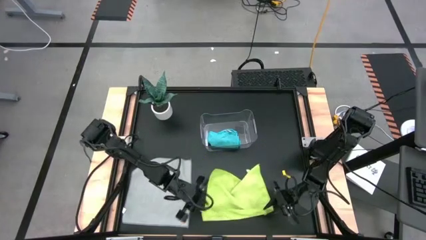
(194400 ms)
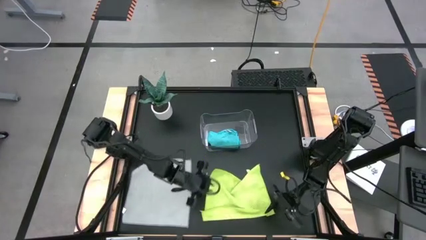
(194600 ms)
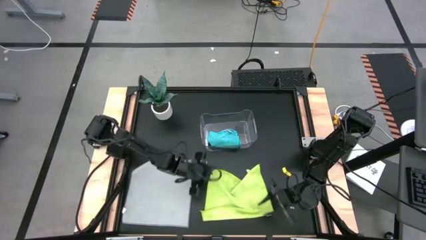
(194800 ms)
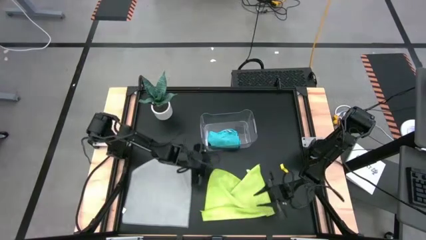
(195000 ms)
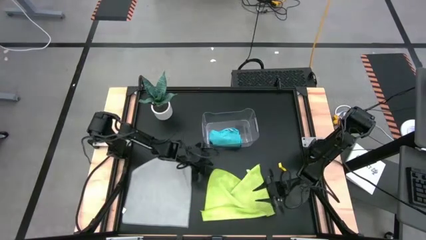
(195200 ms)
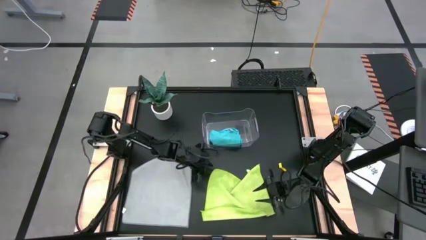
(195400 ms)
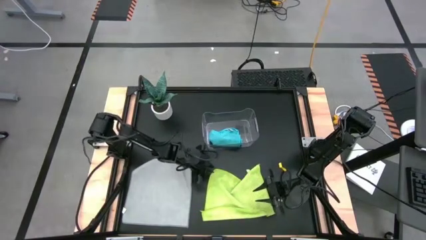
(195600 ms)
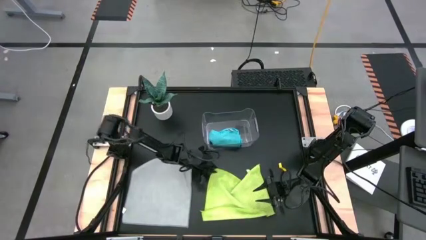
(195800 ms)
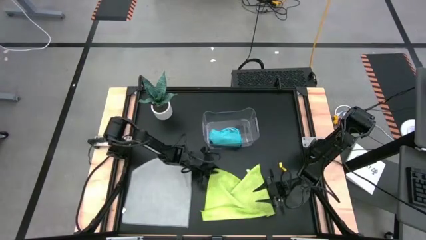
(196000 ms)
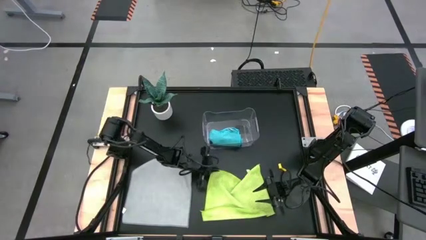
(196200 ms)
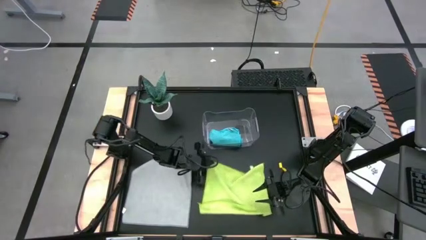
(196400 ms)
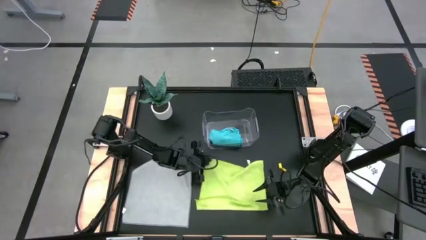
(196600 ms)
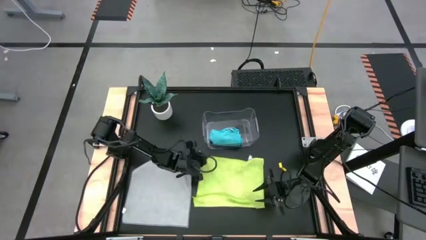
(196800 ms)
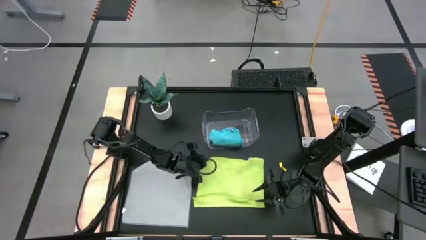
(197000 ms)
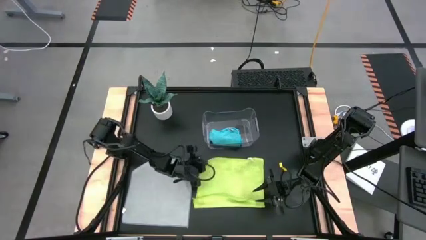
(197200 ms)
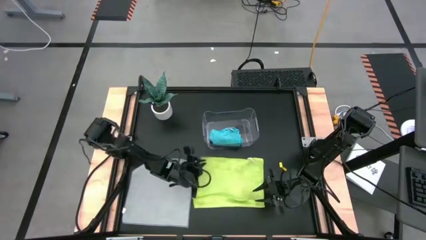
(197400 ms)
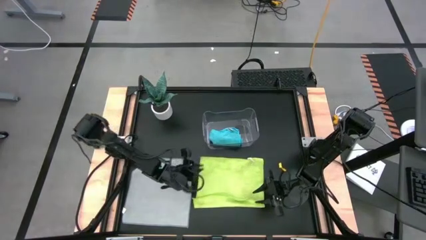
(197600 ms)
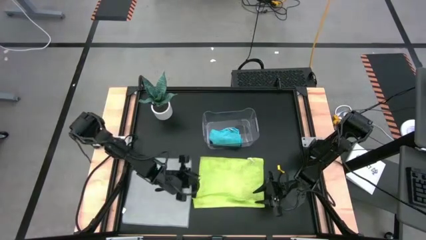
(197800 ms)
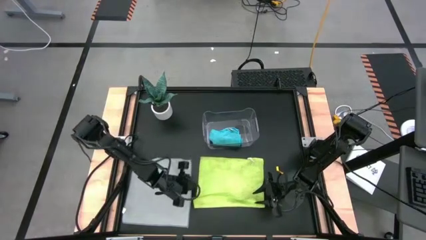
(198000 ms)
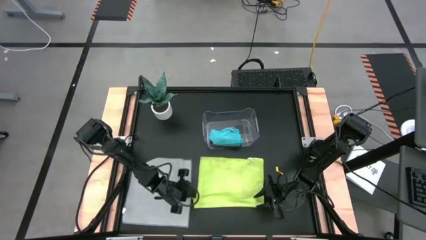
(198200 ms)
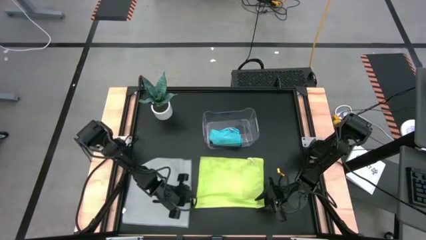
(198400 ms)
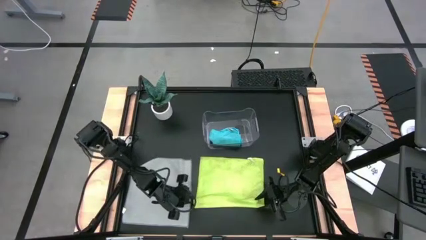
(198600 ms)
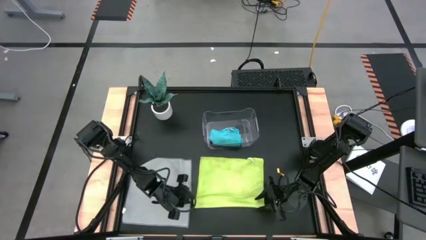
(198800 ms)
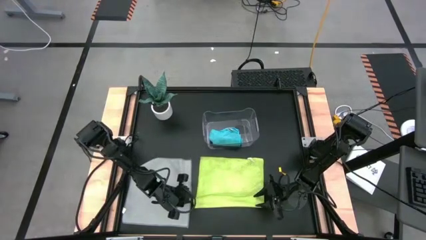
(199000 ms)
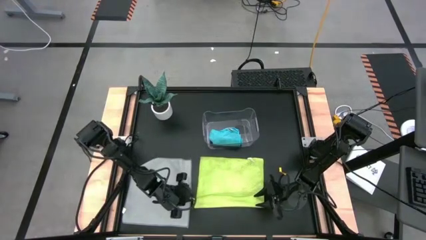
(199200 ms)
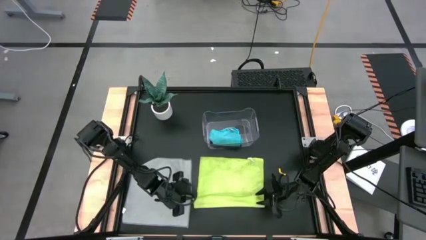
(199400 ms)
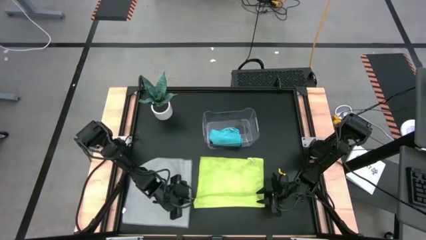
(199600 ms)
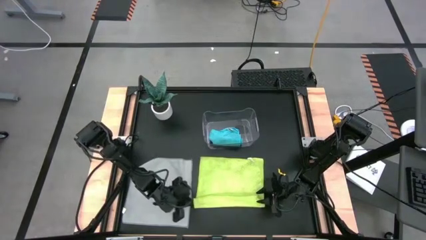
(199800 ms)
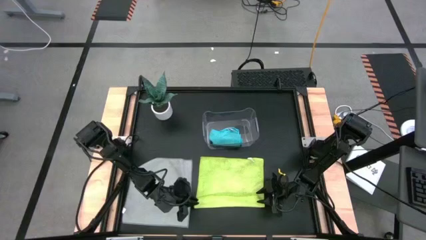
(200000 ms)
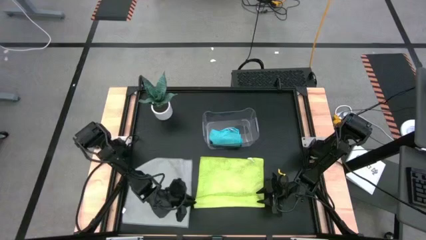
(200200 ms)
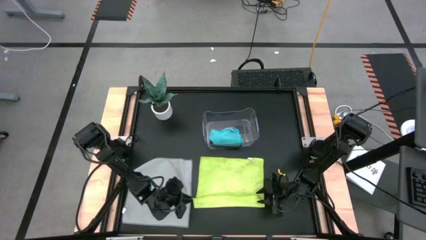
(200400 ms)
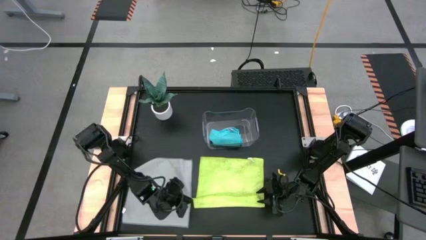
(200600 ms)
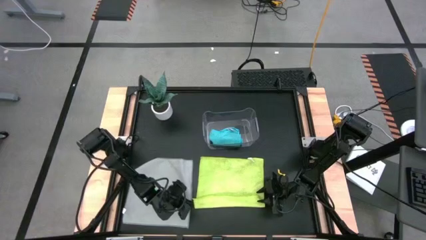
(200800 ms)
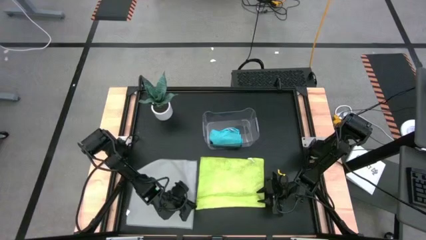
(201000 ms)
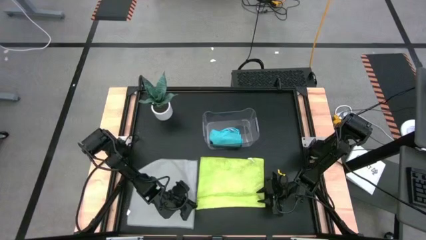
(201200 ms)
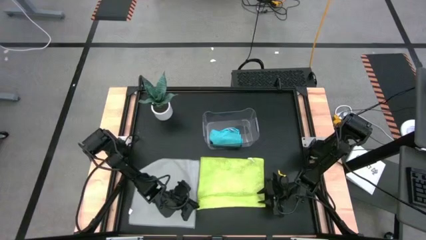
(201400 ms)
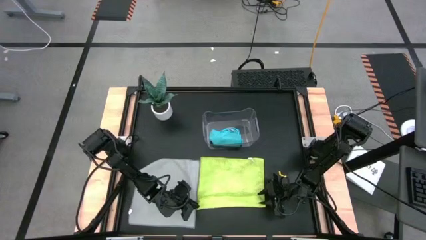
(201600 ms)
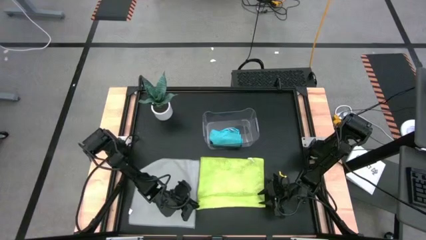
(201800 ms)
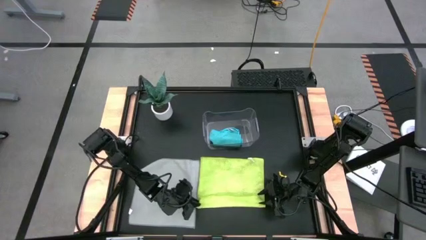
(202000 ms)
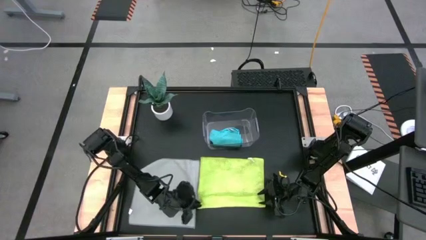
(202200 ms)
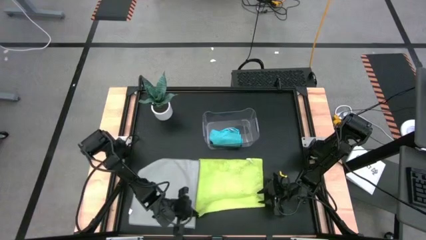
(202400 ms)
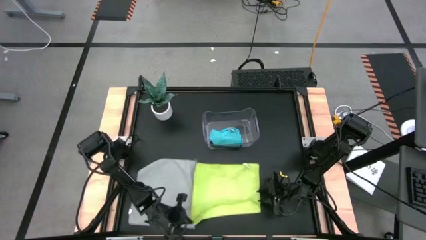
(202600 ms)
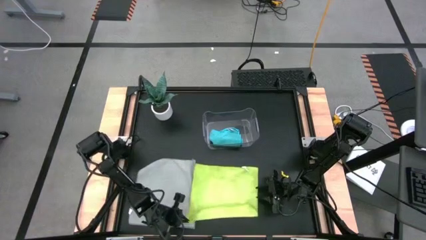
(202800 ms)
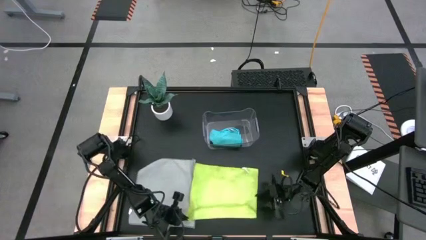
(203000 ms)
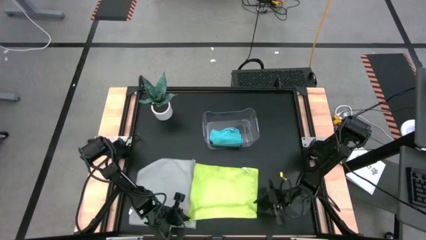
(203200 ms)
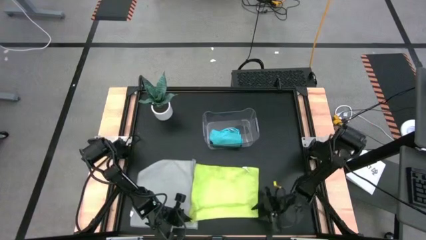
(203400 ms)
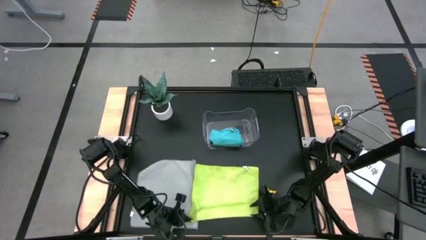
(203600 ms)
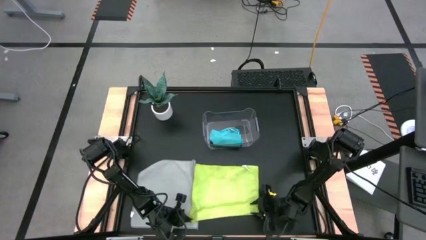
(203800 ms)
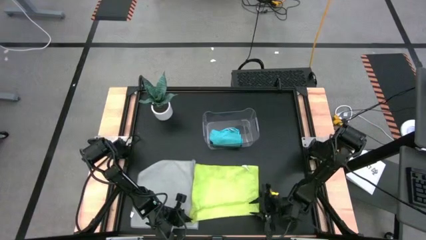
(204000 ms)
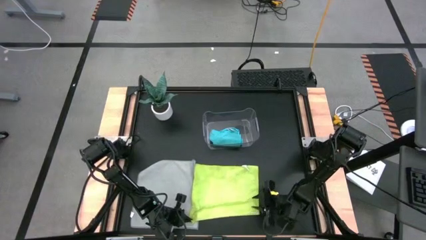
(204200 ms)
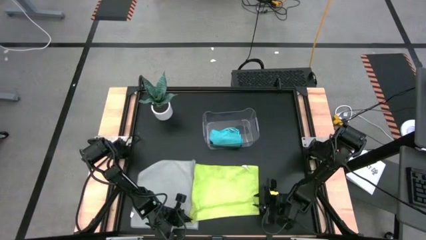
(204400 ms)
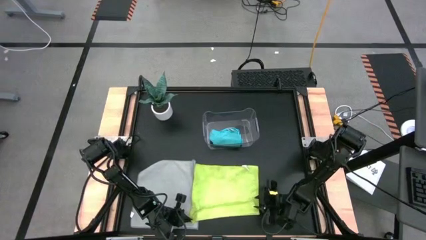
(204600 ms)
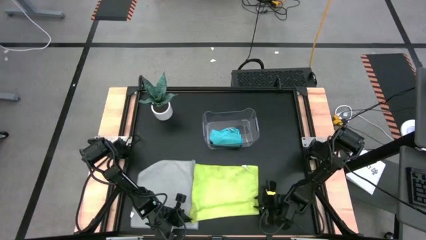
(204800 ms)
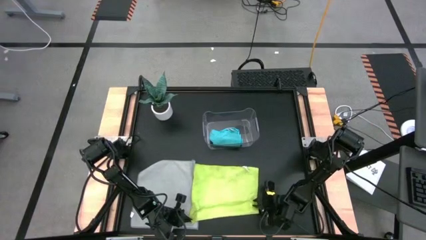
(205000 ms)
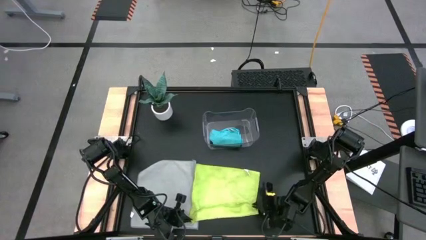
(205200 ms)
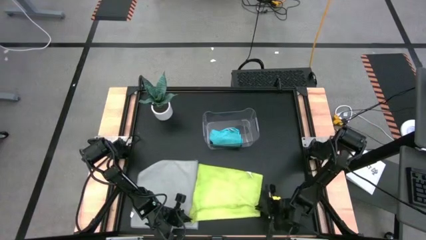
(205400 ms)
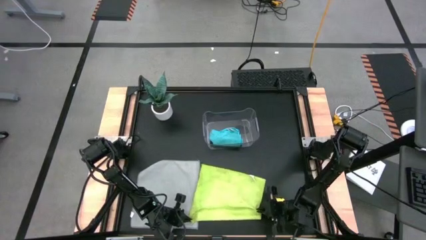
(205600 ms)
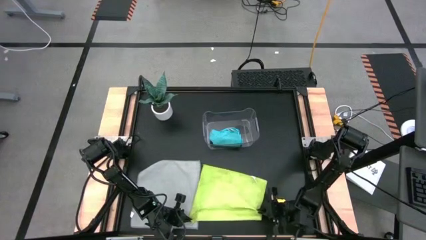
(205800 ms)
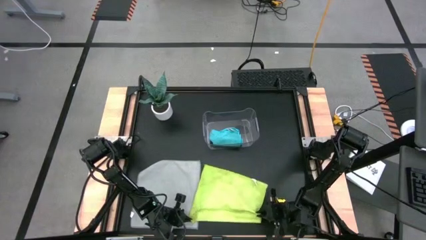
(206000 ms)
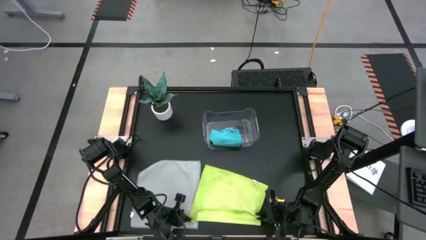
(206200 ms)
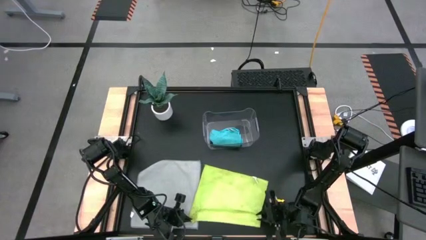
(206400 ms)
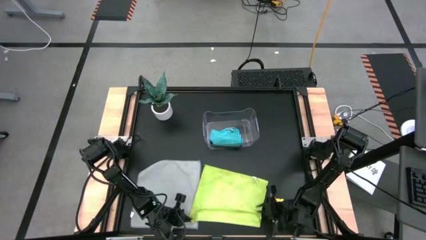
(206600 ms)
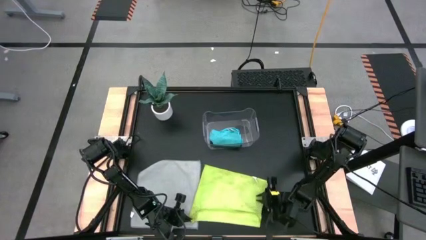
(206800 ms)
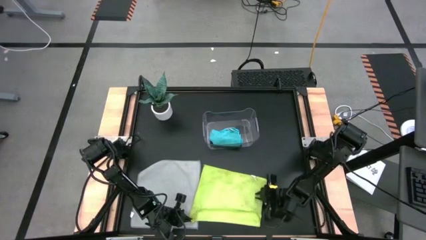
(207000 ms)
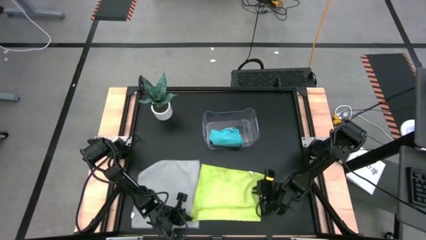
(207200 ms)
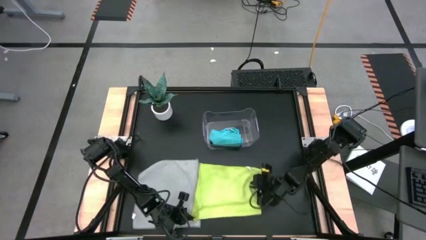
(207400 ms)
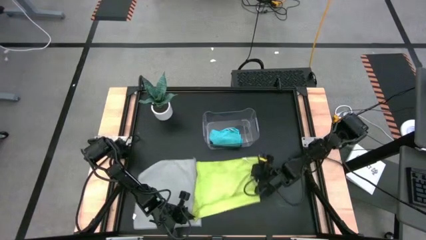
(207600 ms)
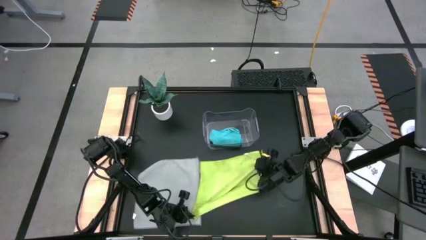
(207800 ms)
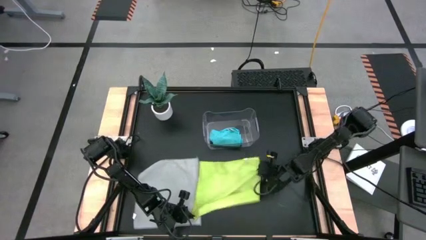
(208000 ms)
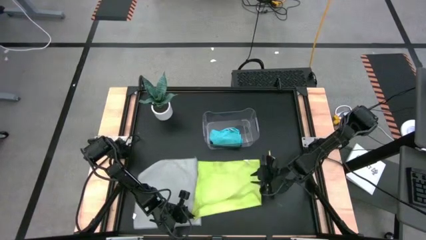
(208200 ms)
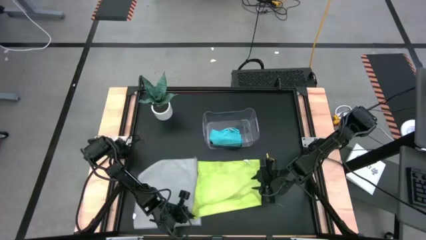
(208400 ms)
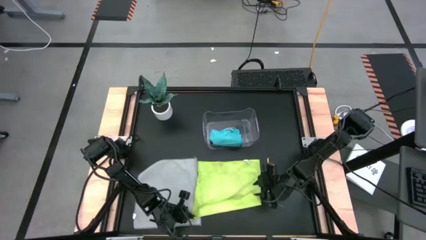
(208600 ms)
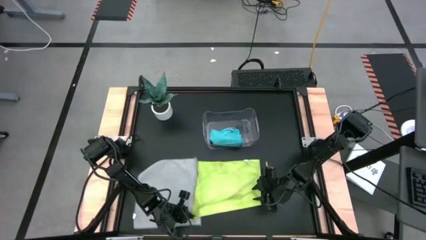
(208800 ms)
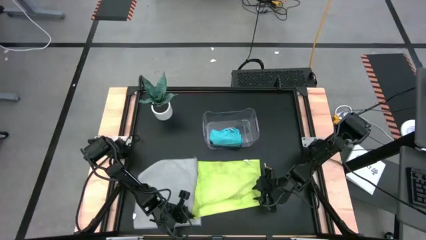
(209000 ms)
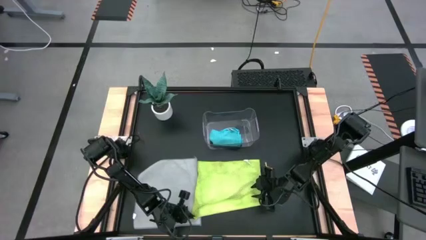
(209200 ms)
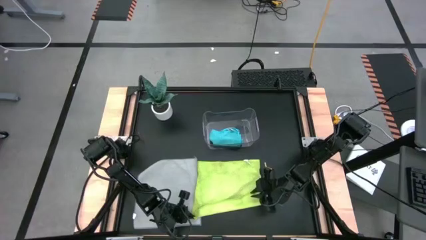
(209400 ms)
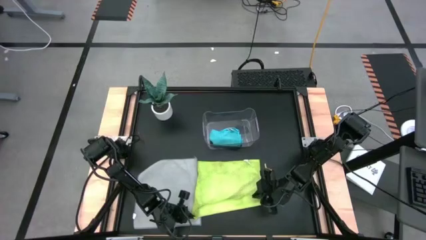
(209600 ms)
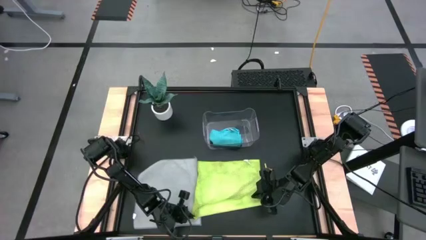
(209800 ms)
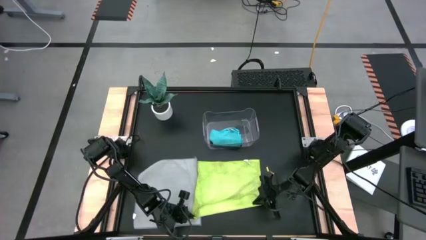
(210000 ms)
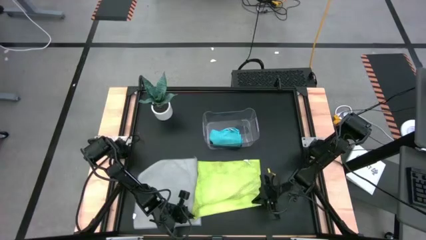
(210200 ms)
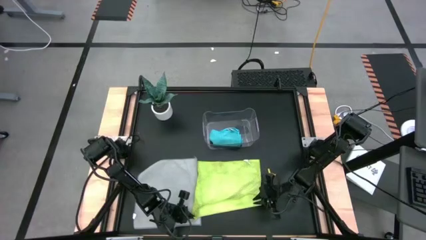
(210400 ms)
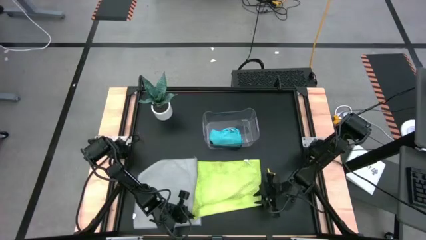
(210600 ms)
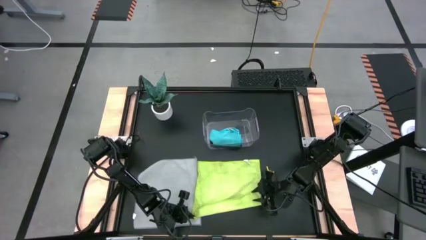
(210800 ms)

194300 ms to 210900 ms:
Task: Fold microfiber towels
Fold the green towel
